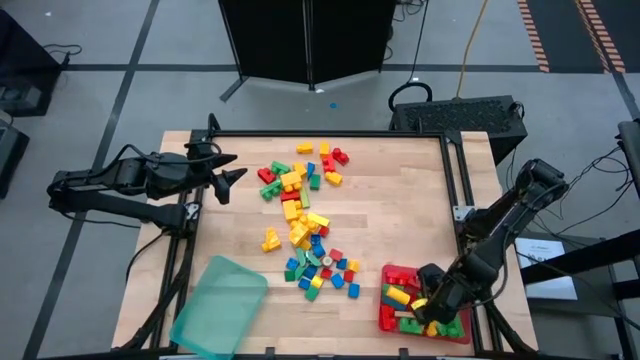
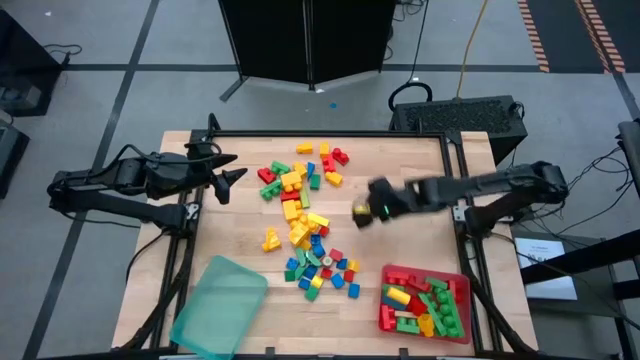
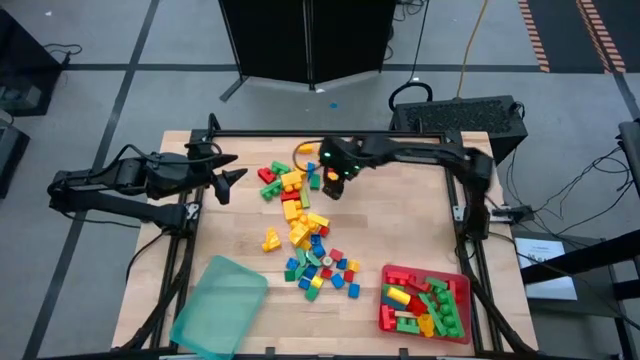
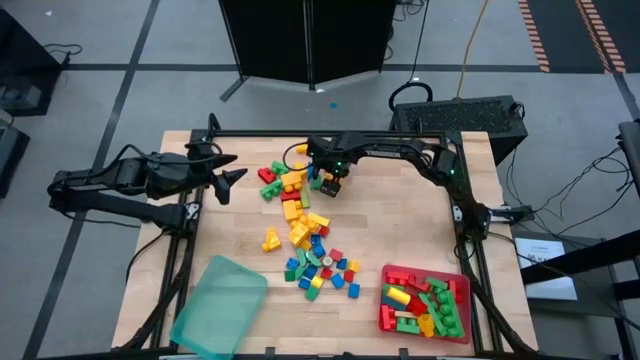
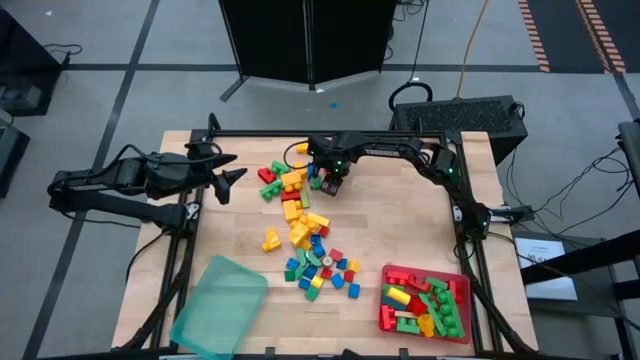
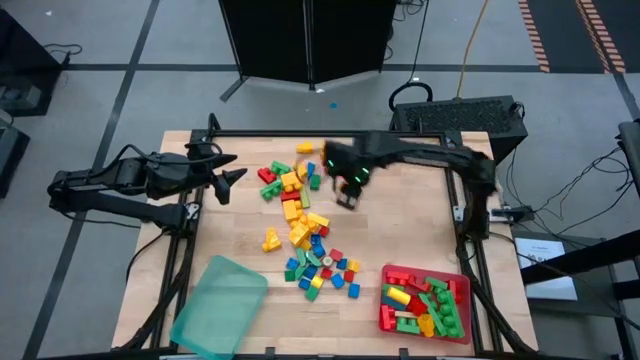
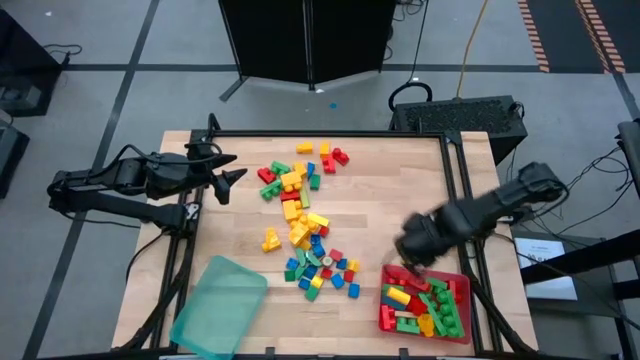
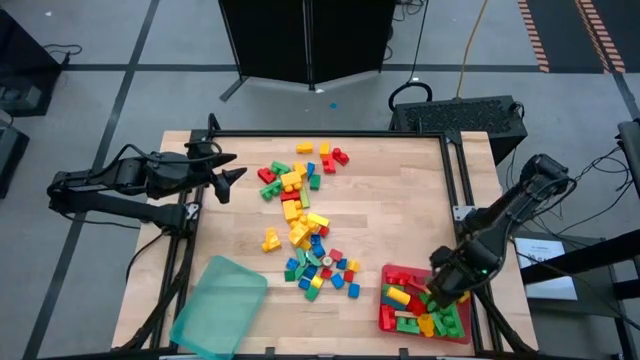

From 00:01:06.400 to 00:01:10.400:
Task: Sort blocks by size
Put the 1-stud yellow game piece into the pink bin

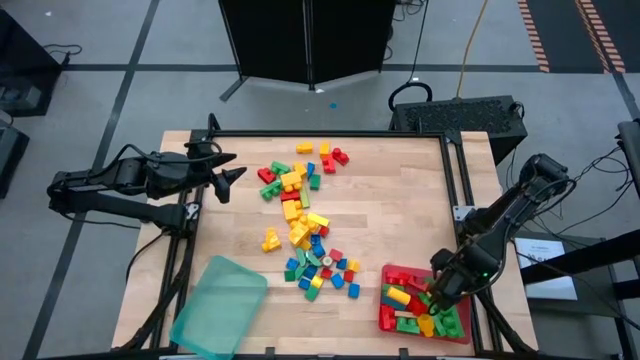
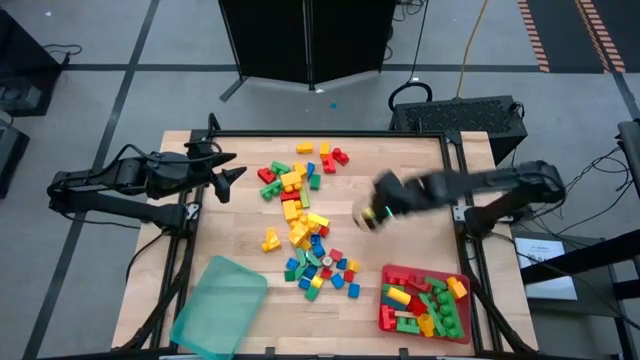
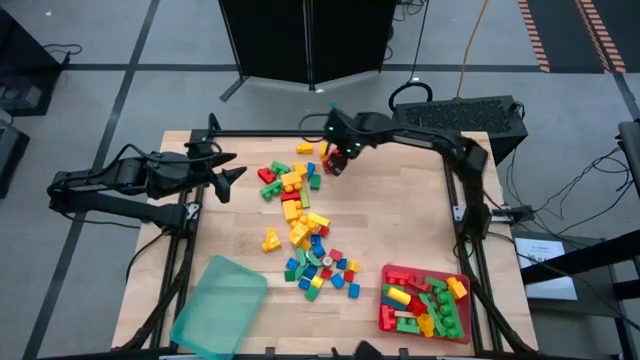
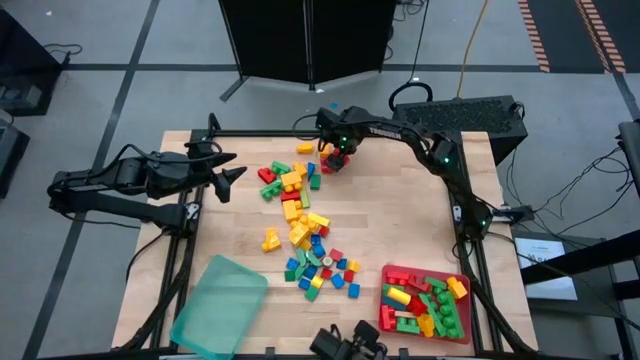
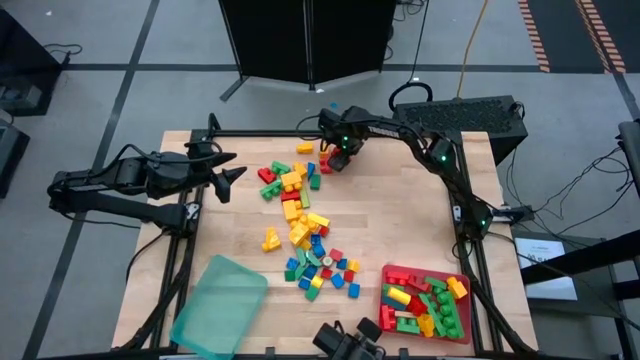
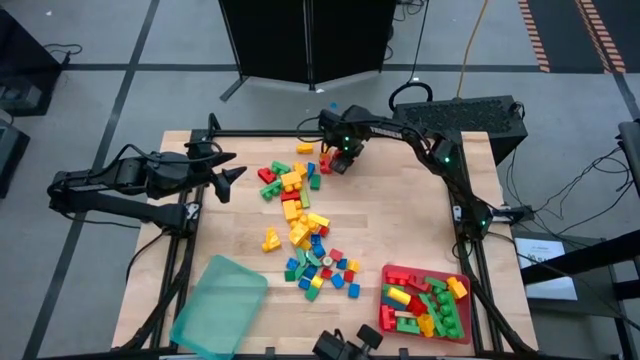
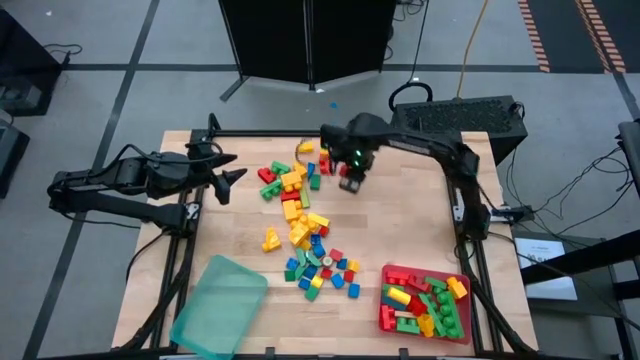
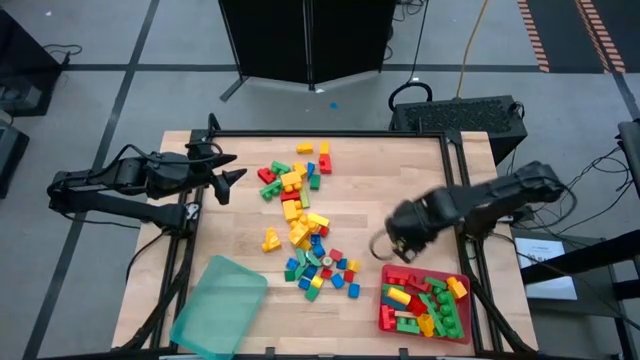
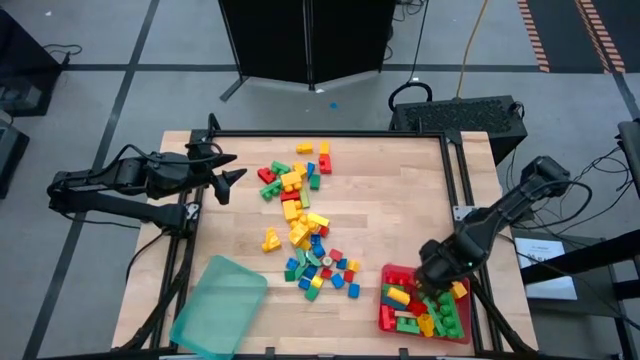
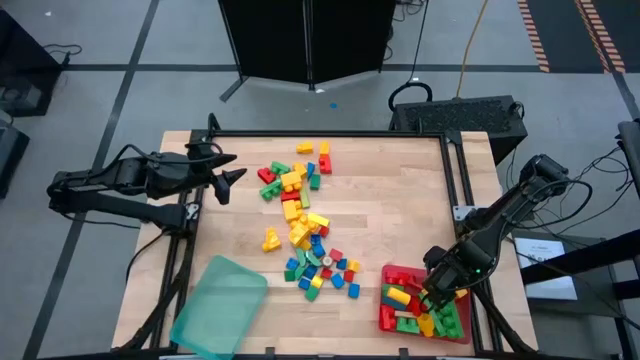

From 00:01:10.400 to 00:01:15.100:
Put the 2-stud red game piece into the pink bin

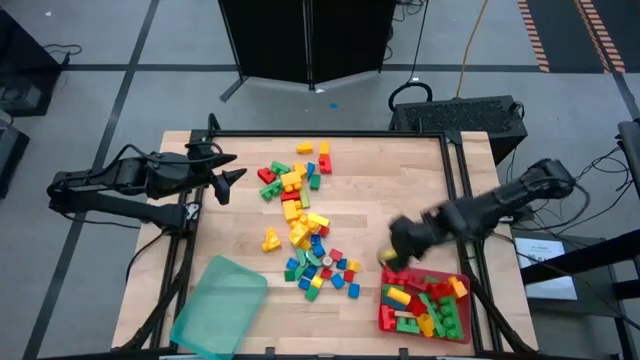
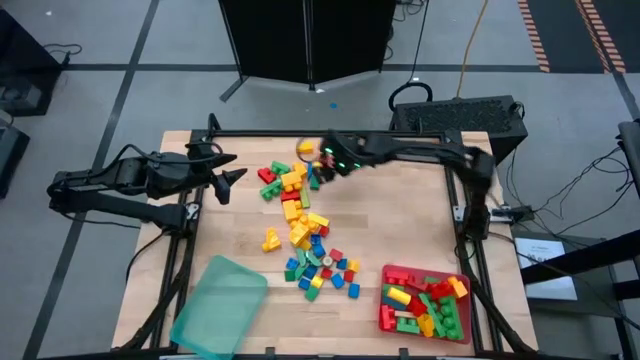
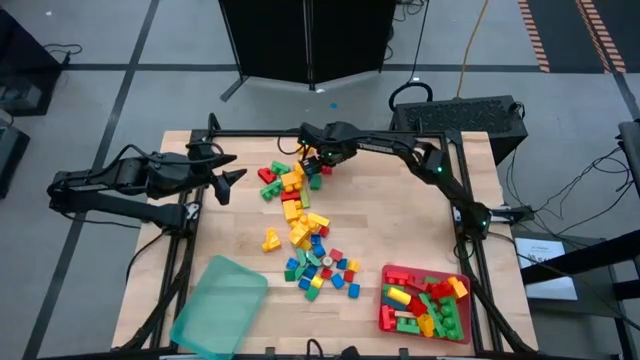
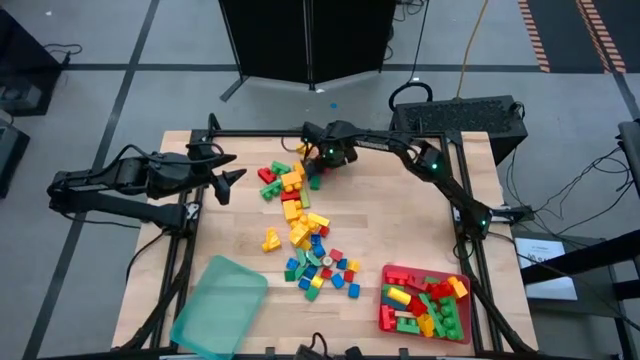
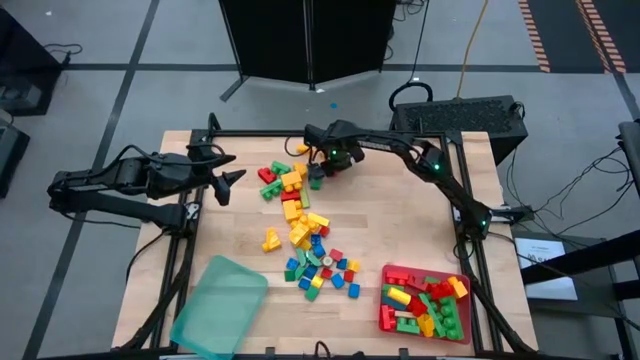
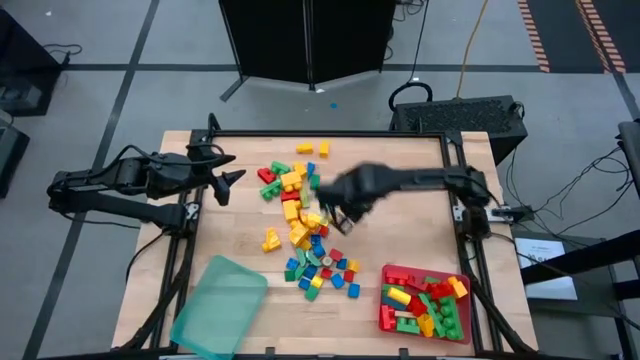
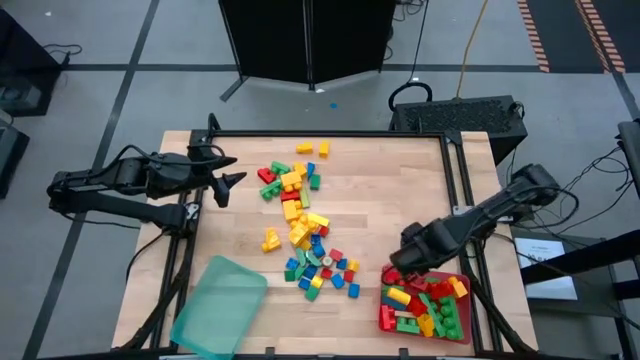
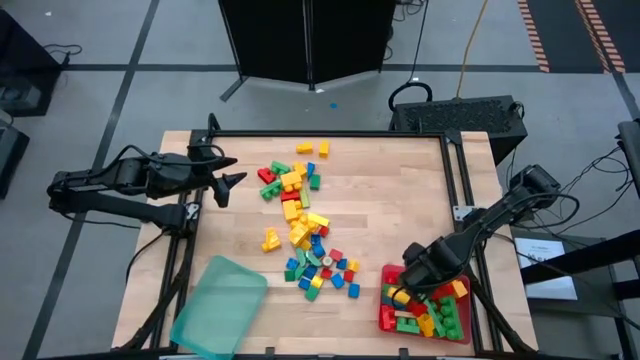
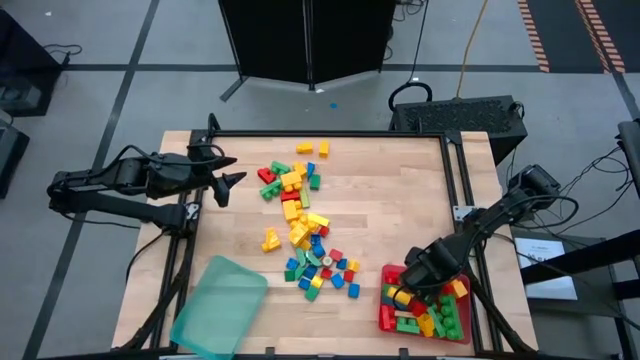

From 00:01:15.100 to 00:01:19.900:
Put the 2-stud red game piece into the pink bin

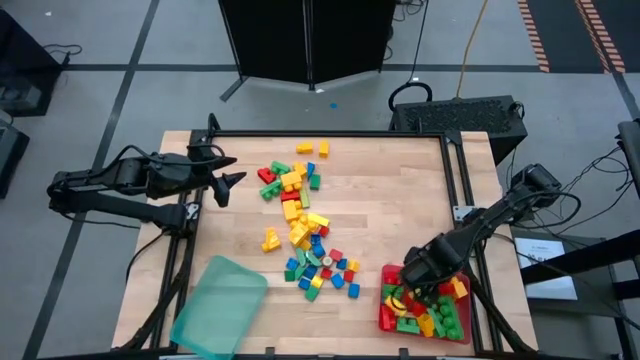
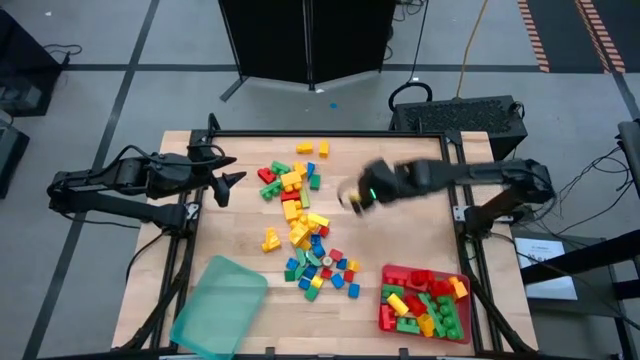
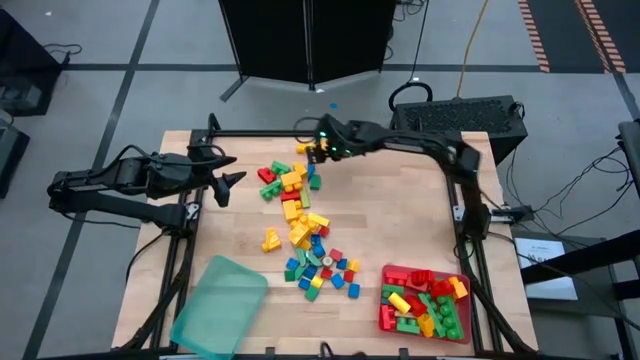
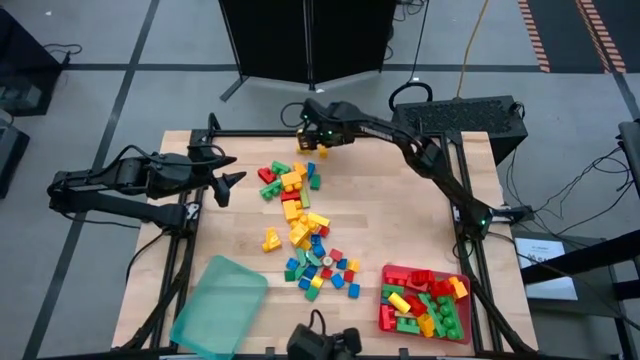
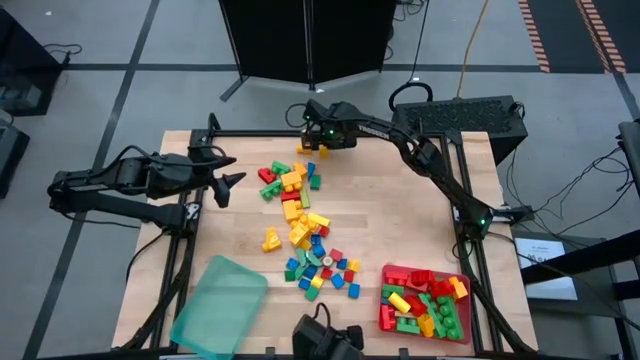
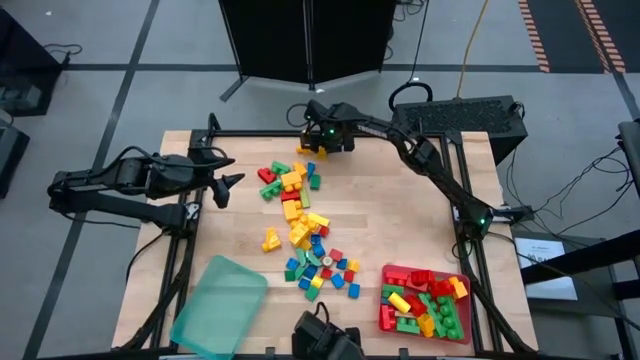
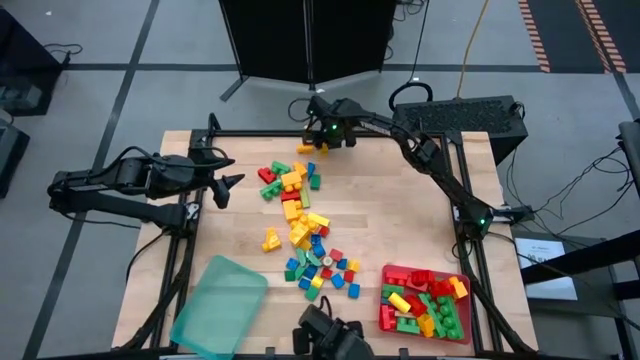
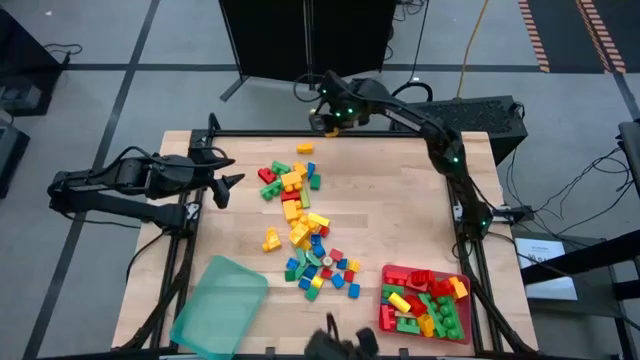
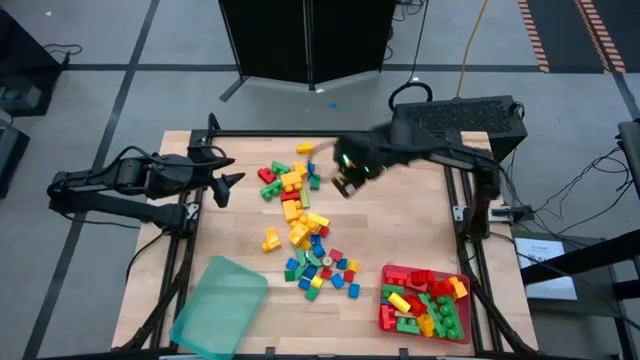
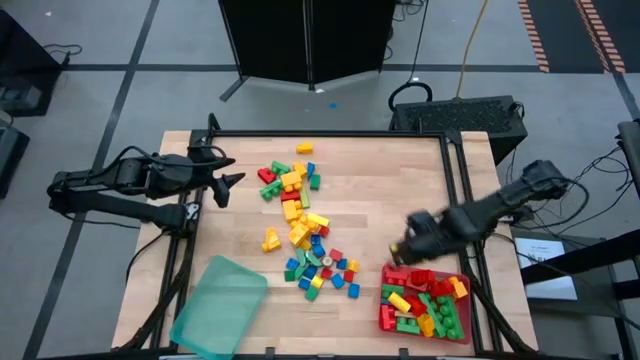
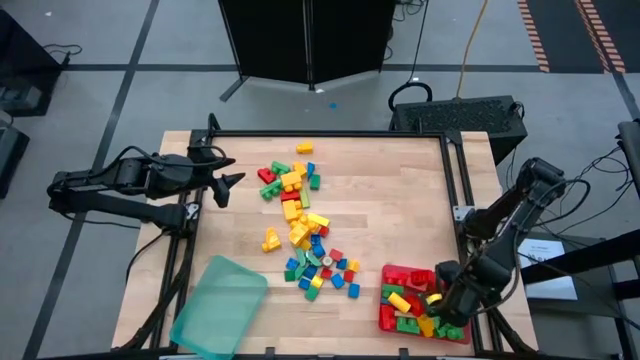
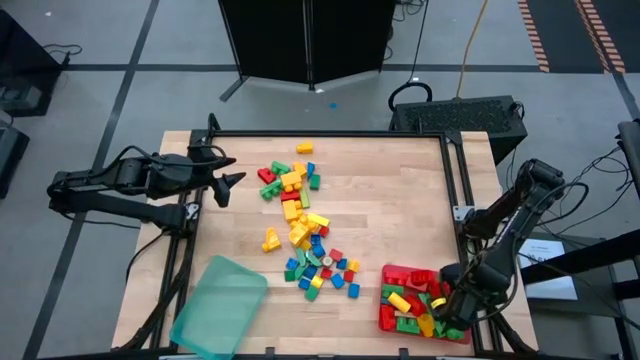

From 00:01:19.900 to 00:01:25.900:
Put the 1-stud yellow game piece into the pink bin

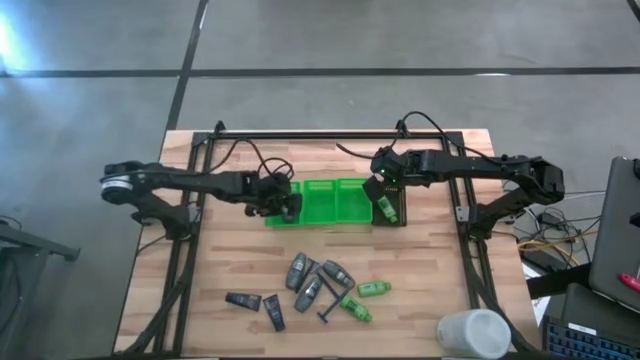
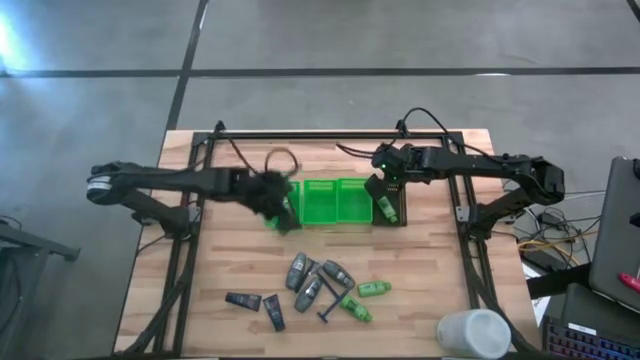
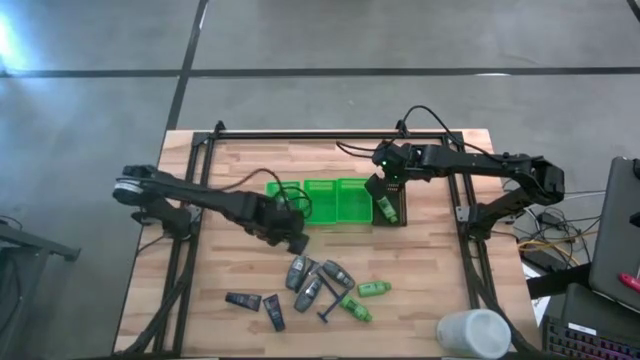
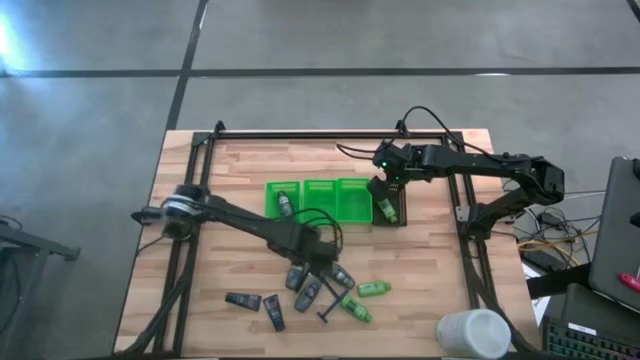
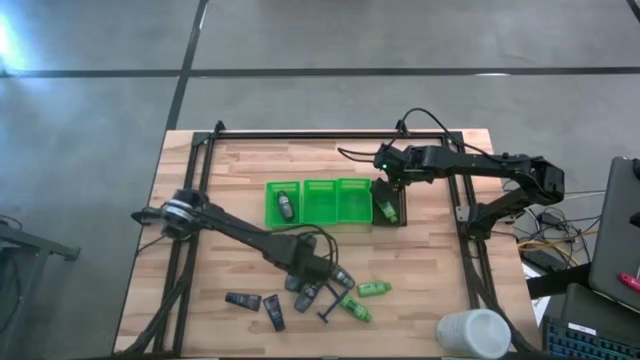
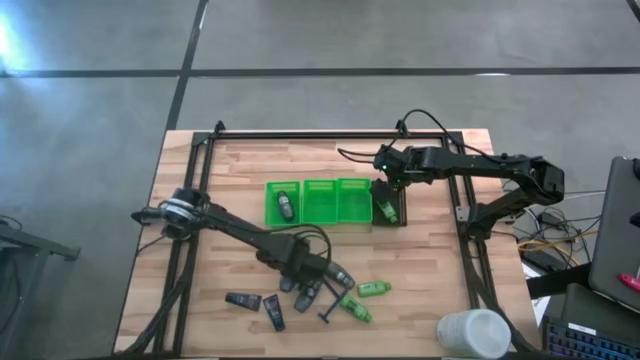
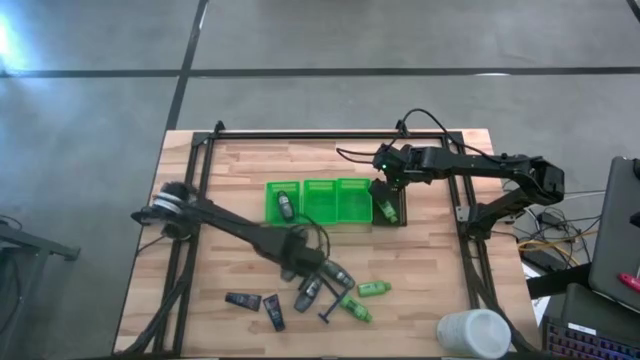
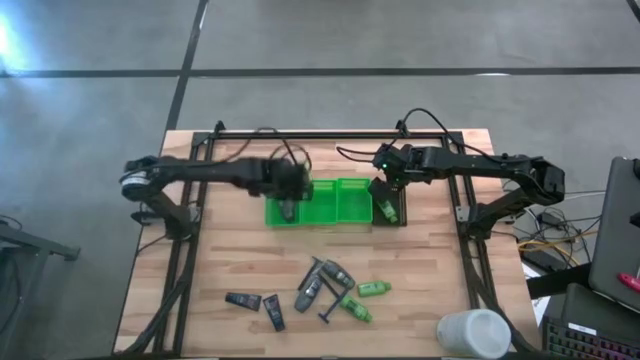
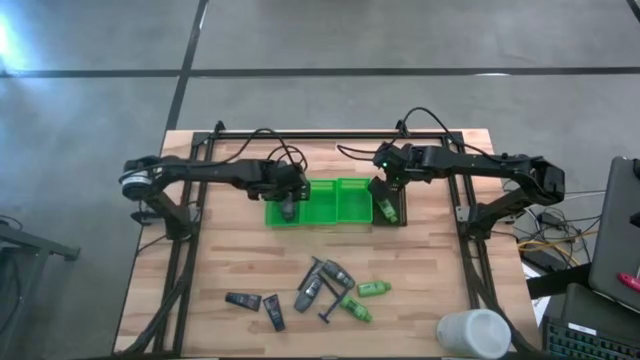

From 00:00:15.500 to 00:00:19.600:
Task: Pick & Place Travel size toiletries
Put the deodorant into the left green bin
